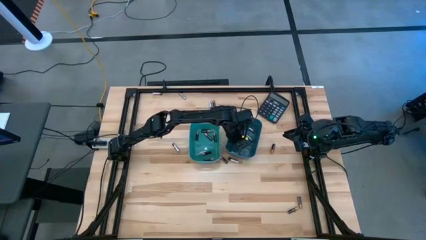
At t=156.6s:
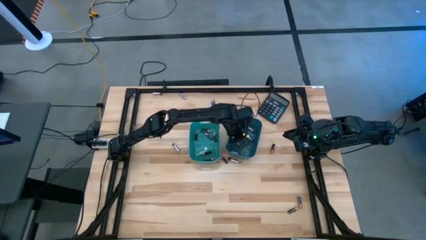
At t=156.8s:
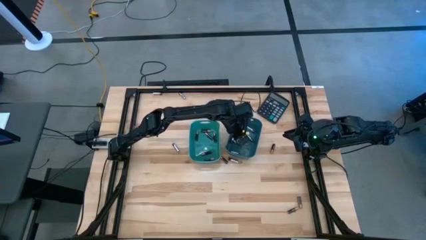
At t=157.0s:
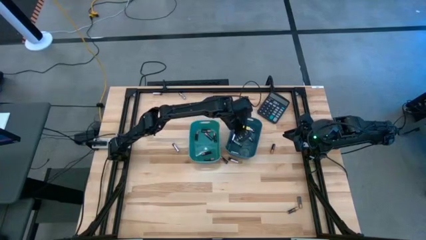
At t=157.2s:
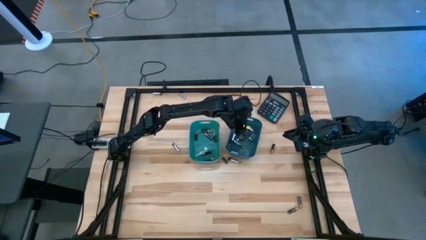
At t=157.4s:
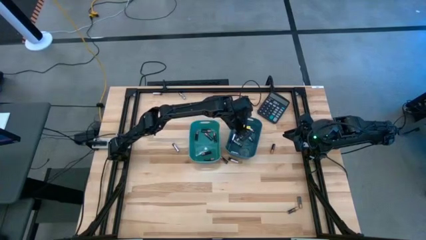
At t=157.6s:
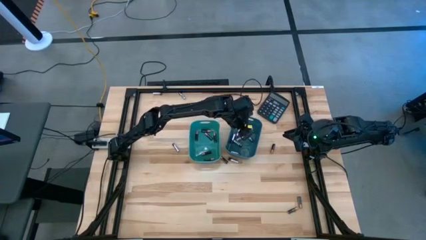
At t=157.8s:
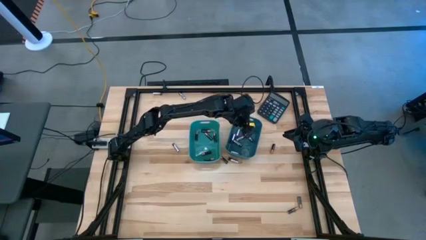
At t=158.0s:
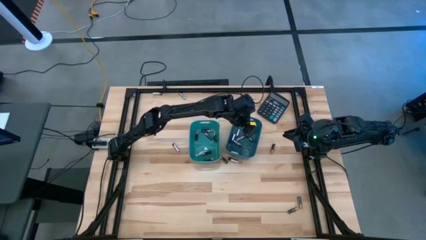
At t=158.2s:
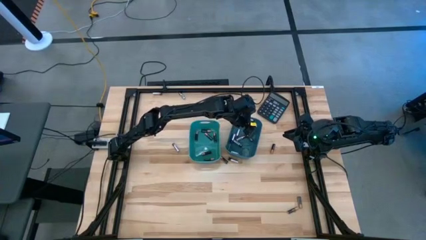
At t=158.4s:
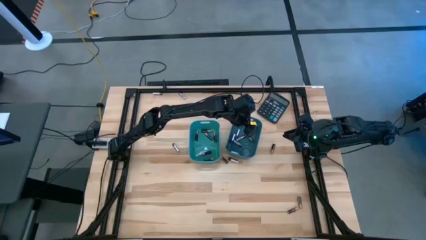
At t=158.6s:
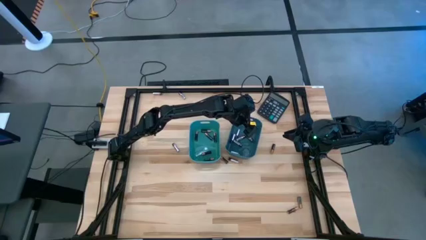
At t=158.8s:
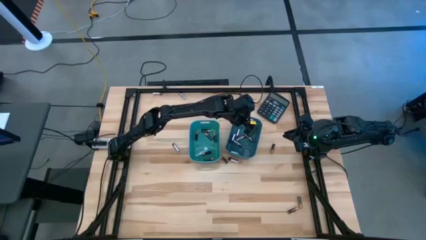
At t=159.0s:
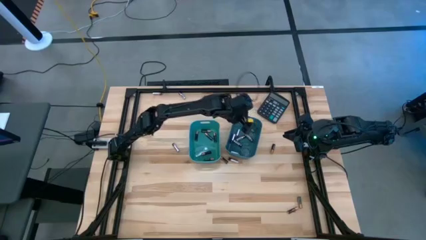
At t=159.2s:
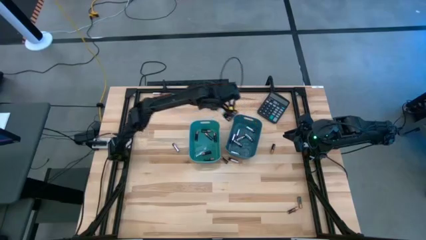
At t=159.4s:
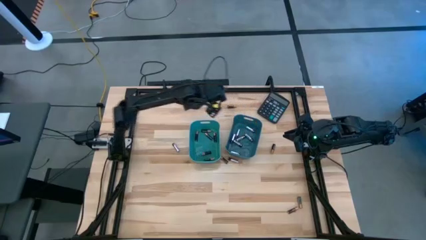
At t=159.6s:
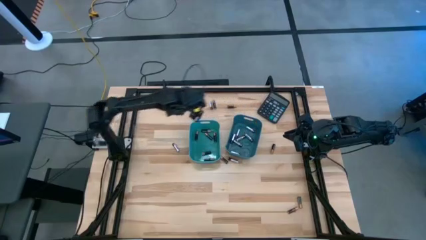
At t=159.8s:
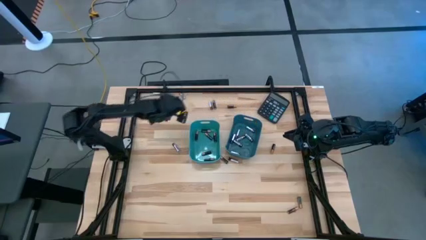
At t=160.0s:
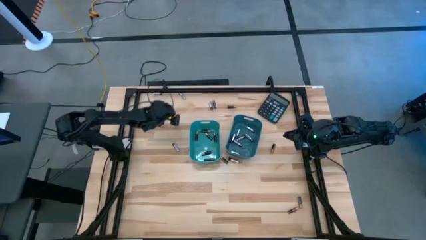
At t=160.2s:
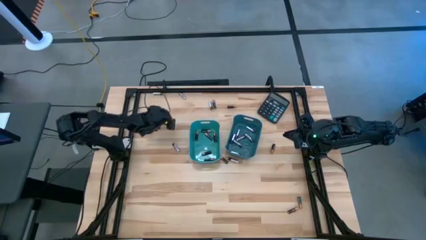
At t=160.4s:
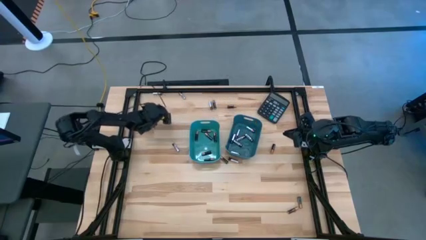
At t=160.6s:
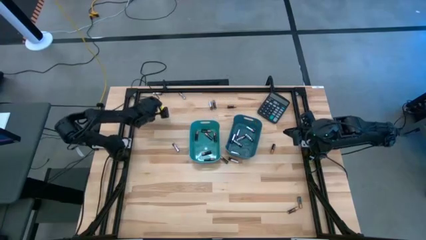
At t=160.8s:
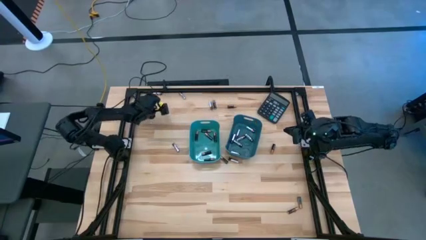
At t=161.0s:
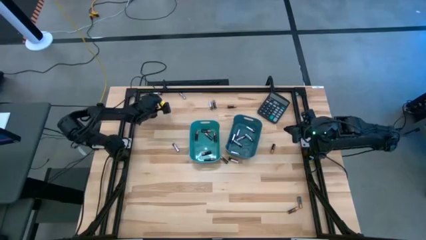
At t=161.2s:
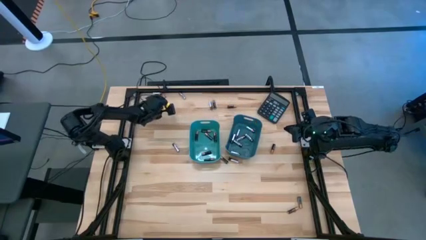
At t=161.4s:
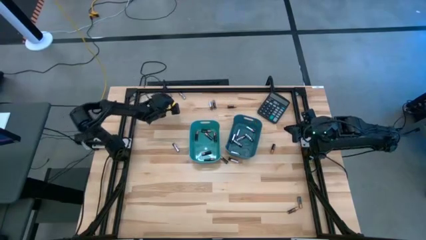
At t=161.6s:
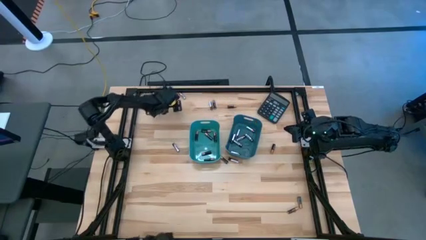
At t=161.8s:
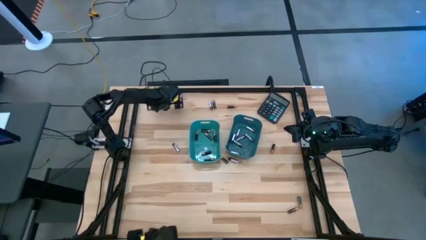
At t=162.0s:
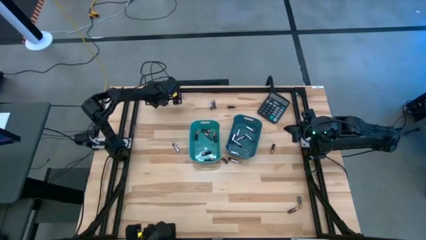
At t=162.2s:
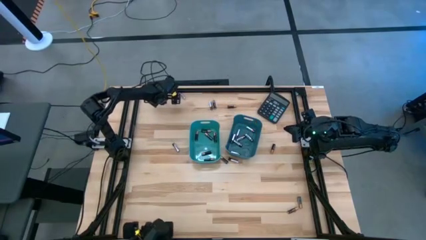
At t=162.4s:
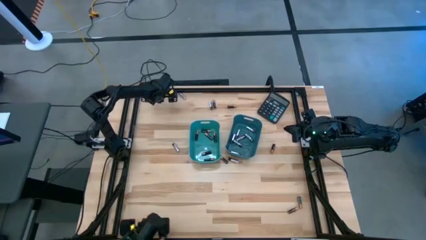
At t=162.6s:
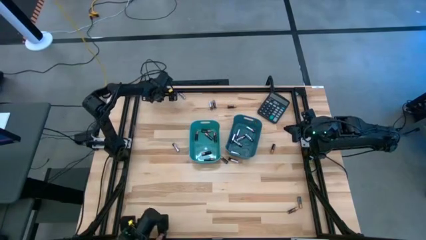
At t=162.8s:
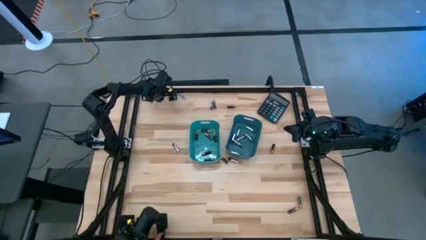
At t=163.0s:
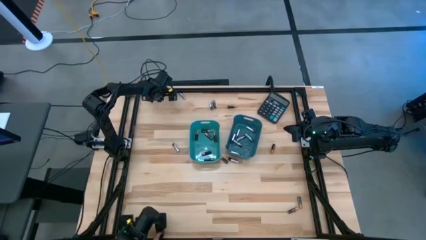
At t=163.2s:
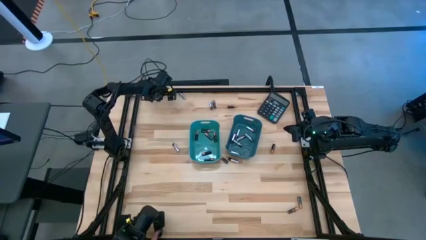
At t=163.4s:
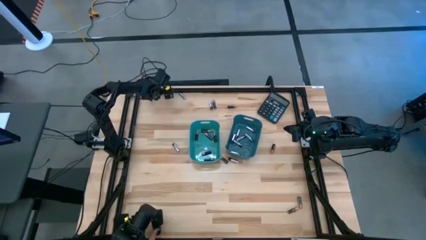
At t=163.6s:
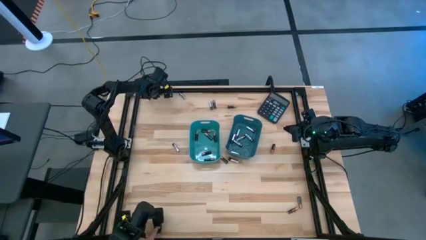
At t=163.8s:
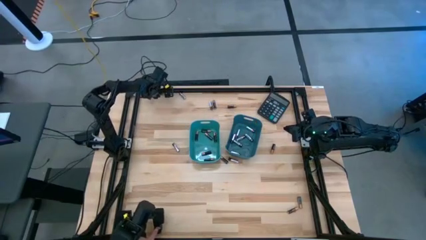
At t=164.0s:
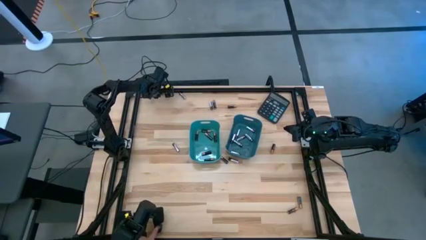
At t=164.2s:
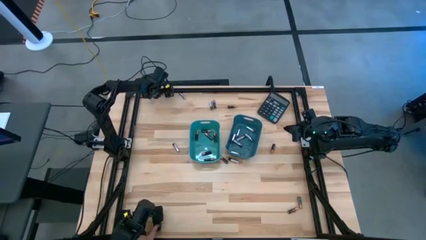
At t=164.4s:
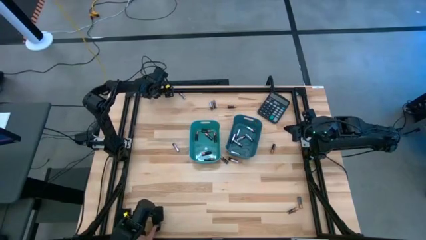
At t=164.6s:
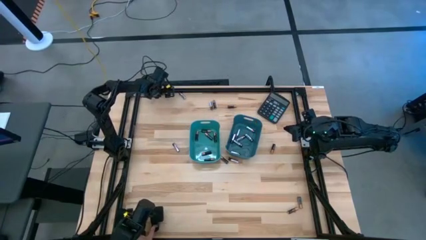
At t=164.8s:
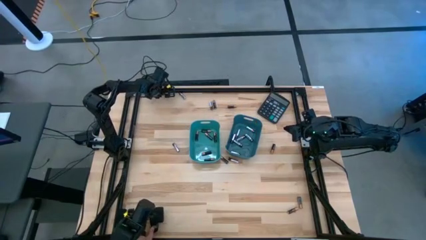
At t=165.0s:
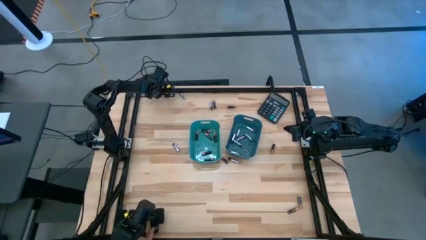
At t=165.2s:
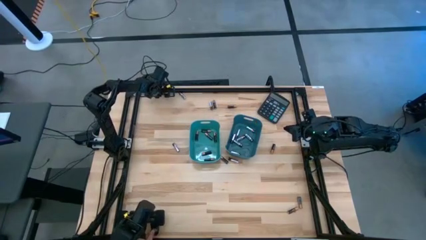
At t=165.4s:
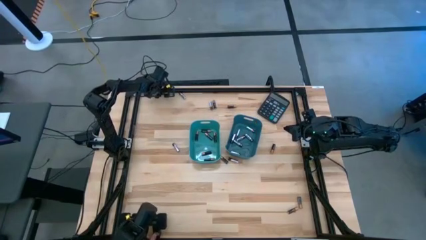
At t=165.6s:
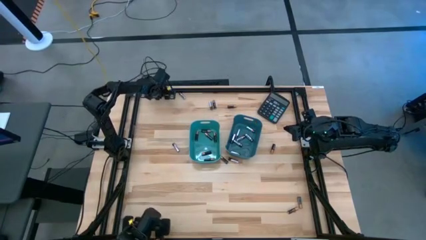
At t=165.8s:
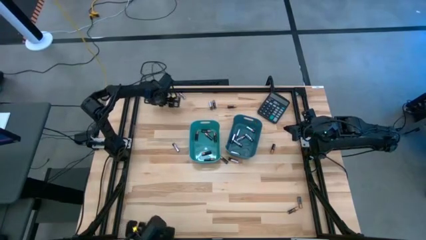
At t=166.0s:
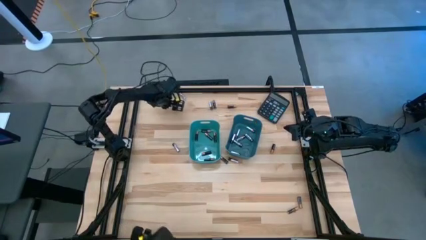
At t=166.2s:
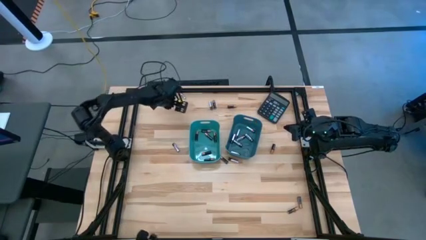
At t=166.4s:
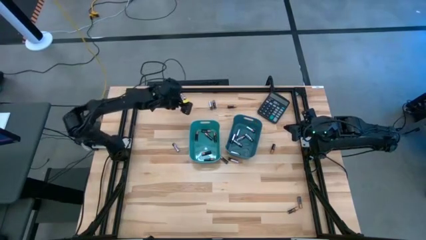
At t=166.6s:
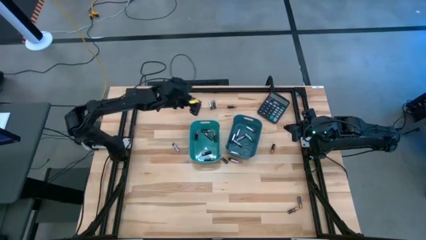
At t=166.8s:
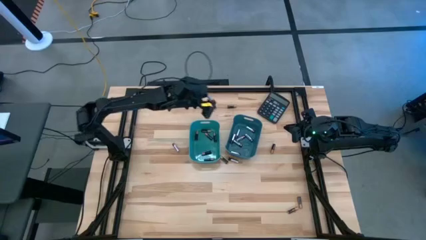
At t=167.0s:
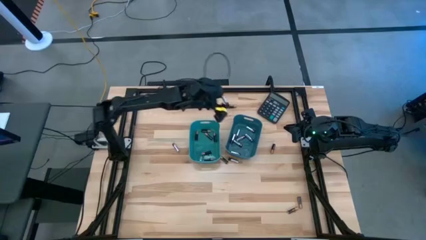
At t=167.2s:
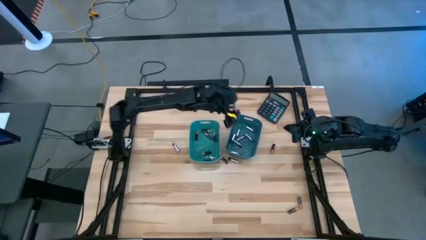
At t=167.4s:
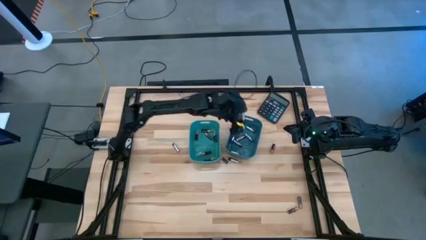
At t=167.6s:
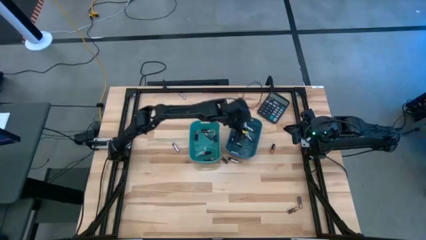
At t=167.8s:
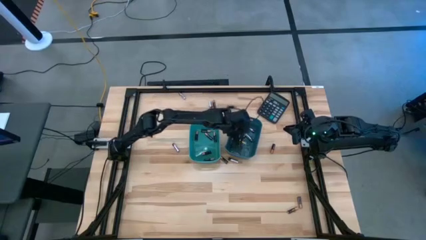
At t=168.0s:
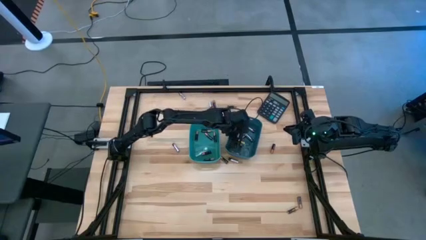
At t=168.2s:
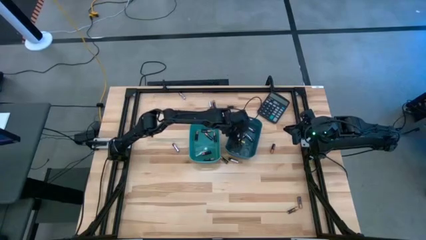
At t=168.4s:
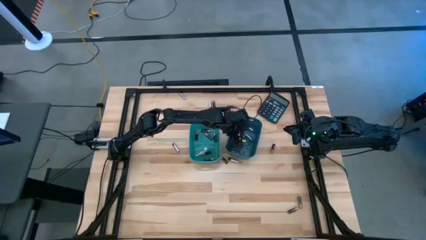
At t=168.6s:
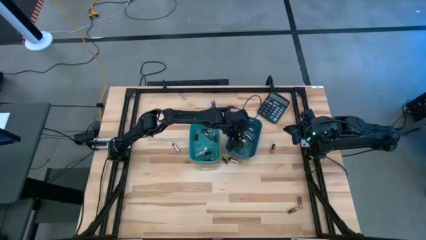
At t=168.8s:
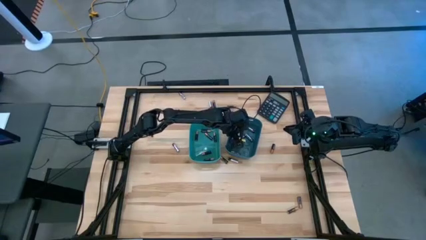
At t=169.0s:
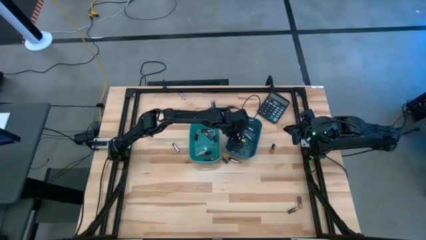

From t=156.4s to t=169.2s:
Task: Sort batteries
Put the silver battery into the blue bin
